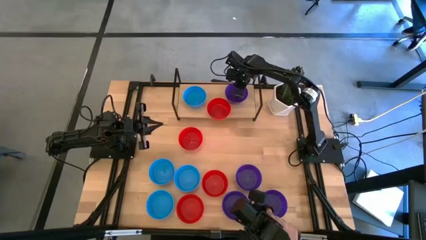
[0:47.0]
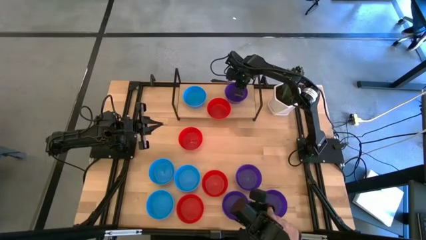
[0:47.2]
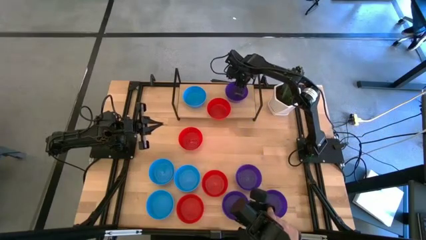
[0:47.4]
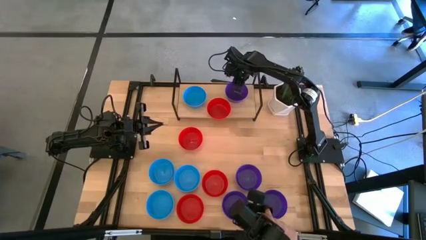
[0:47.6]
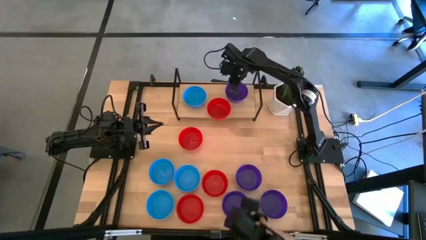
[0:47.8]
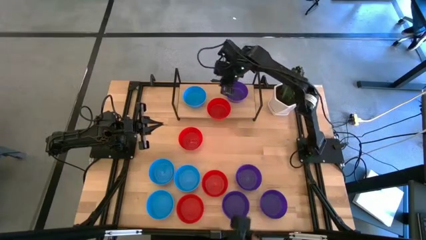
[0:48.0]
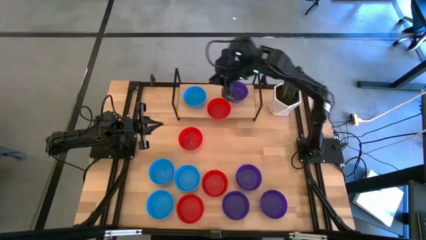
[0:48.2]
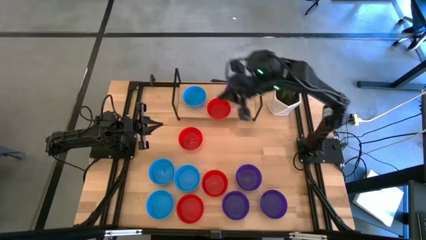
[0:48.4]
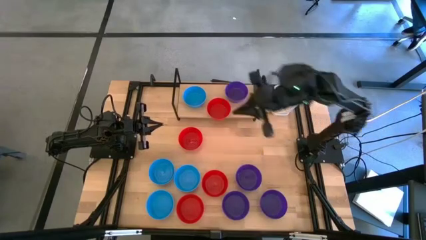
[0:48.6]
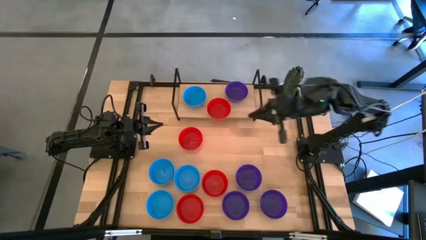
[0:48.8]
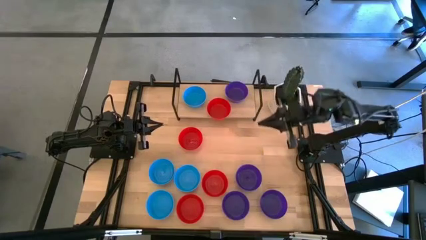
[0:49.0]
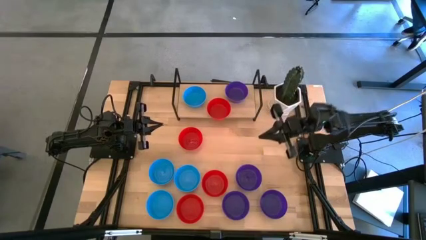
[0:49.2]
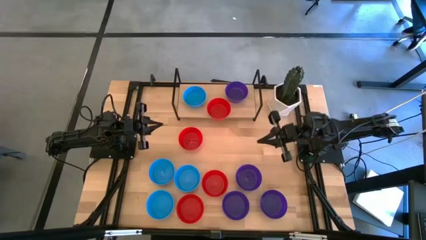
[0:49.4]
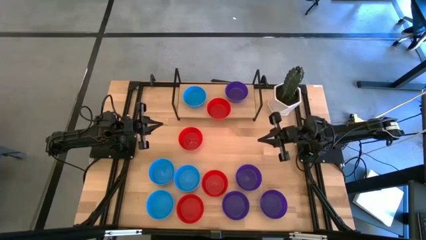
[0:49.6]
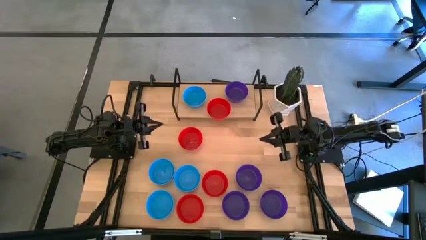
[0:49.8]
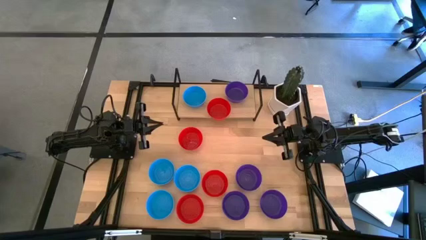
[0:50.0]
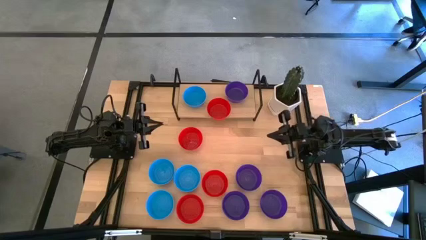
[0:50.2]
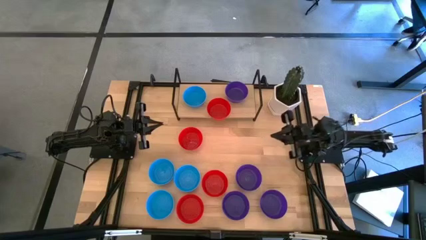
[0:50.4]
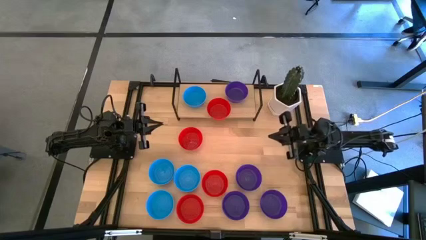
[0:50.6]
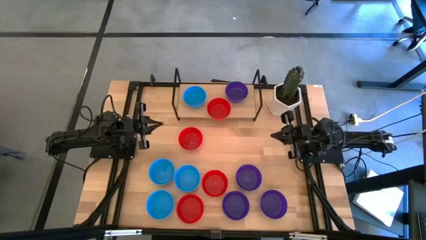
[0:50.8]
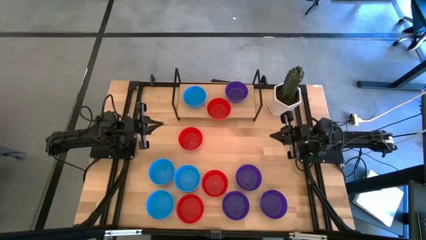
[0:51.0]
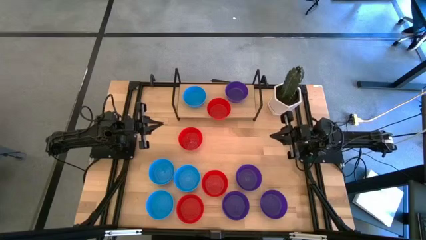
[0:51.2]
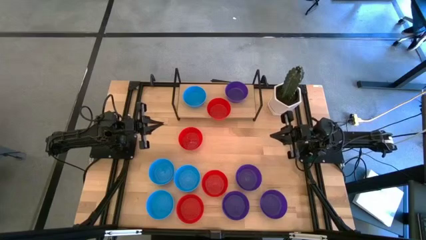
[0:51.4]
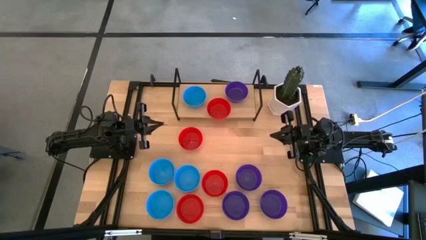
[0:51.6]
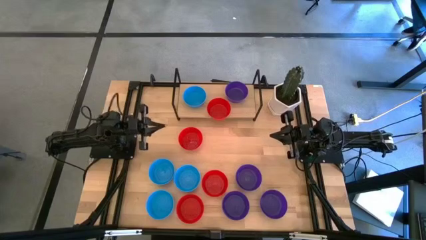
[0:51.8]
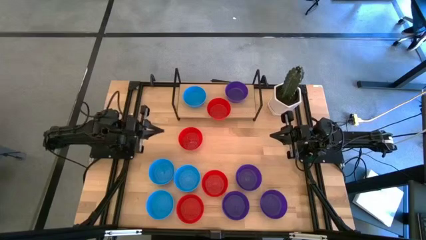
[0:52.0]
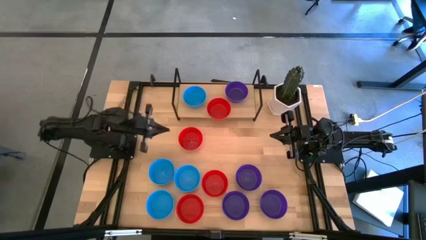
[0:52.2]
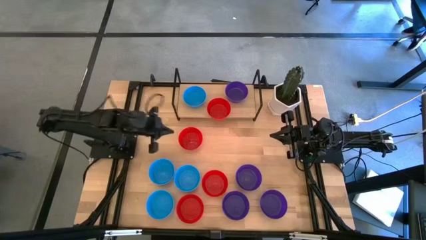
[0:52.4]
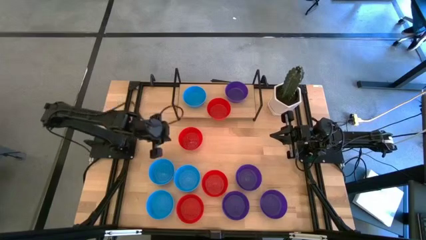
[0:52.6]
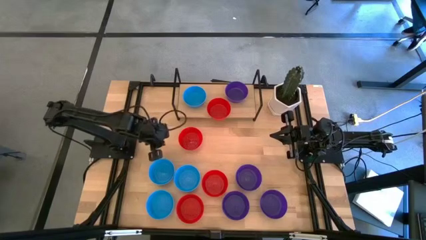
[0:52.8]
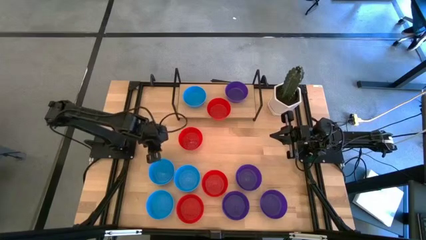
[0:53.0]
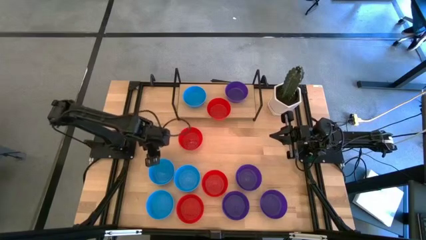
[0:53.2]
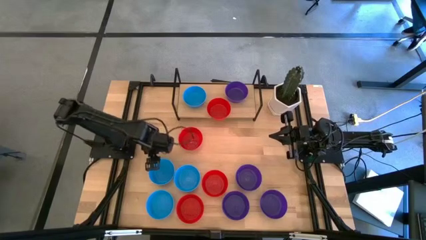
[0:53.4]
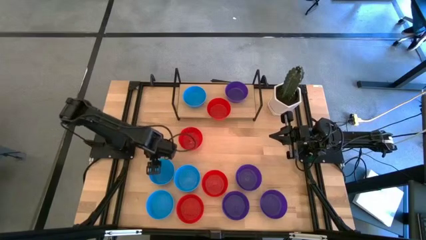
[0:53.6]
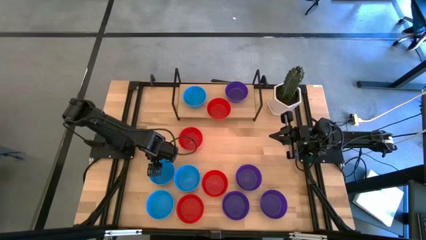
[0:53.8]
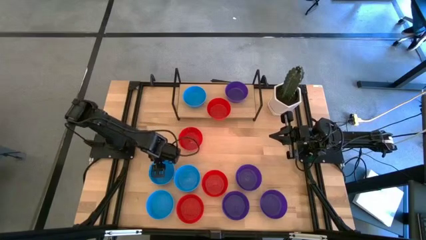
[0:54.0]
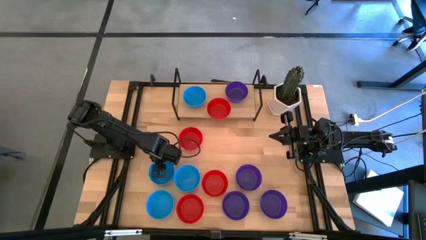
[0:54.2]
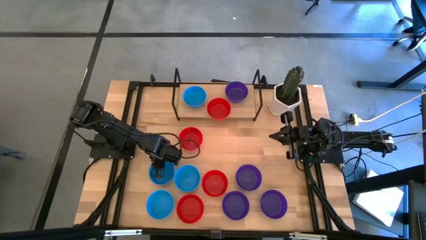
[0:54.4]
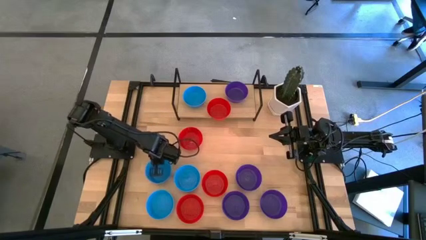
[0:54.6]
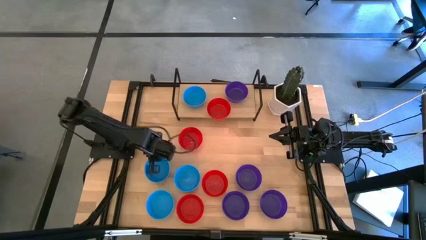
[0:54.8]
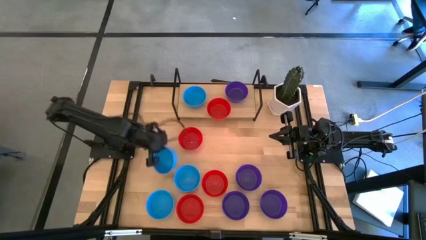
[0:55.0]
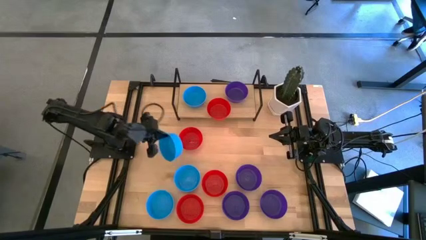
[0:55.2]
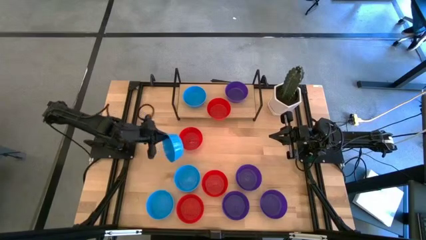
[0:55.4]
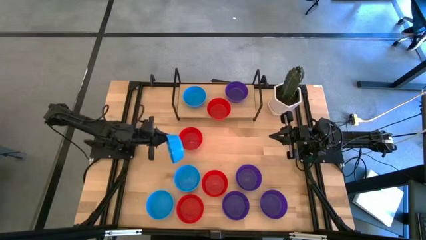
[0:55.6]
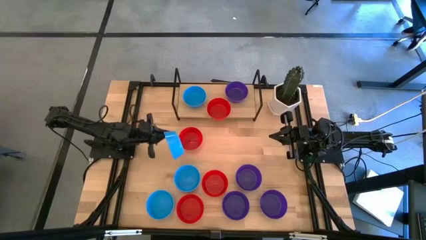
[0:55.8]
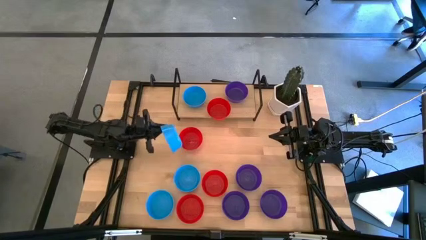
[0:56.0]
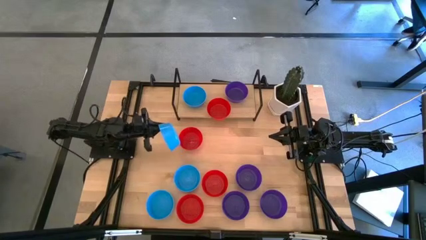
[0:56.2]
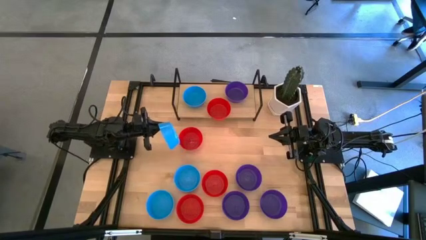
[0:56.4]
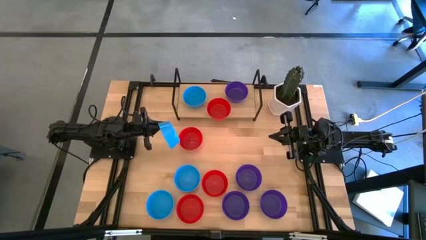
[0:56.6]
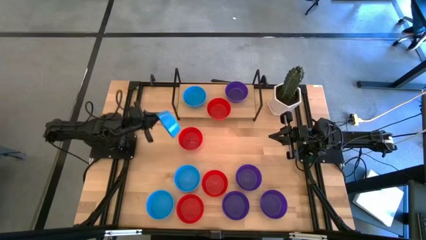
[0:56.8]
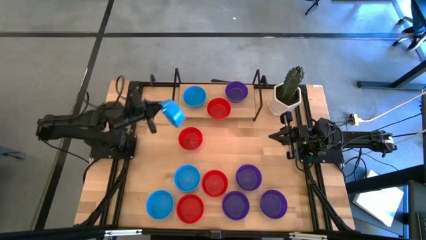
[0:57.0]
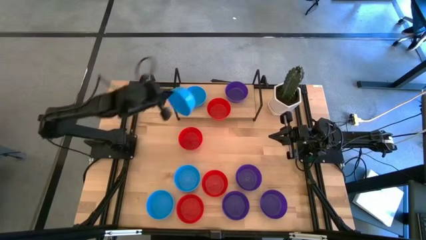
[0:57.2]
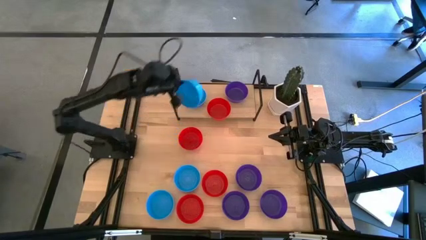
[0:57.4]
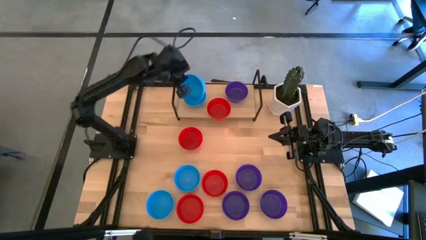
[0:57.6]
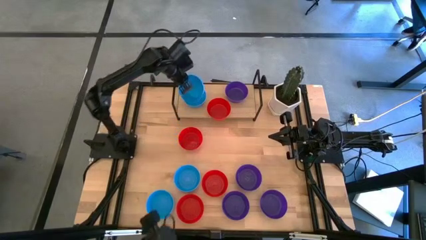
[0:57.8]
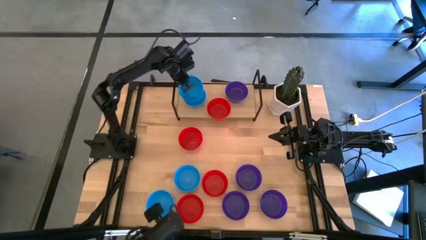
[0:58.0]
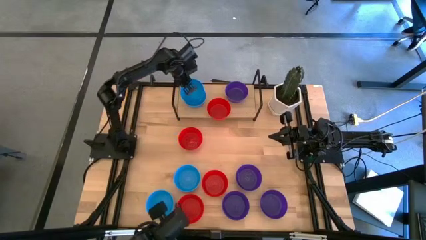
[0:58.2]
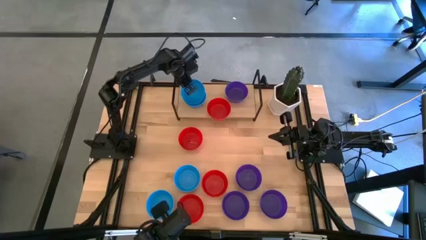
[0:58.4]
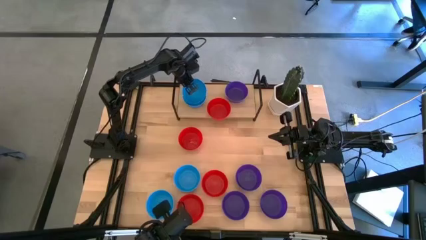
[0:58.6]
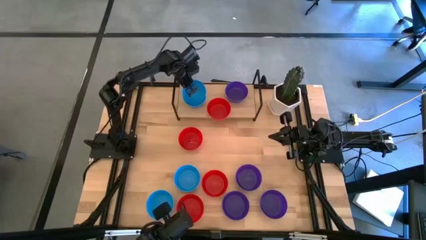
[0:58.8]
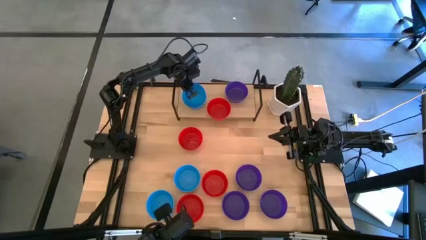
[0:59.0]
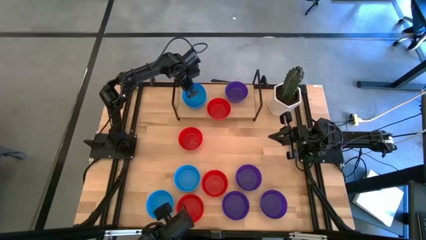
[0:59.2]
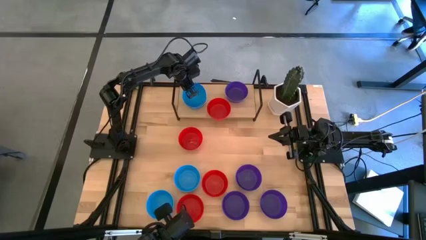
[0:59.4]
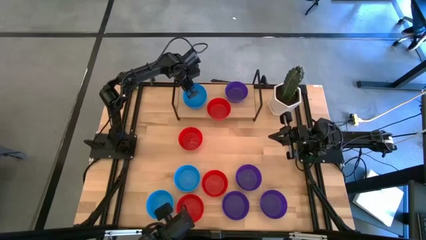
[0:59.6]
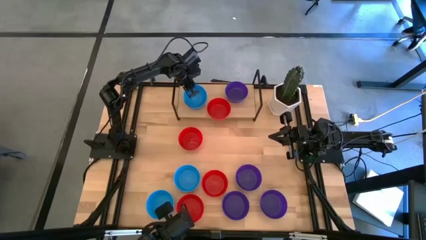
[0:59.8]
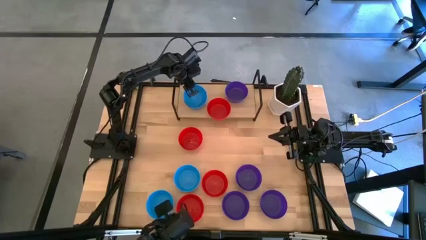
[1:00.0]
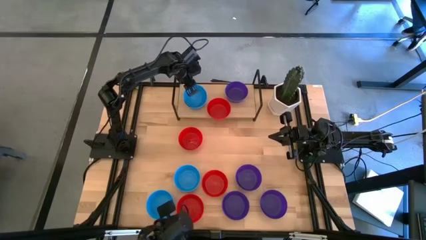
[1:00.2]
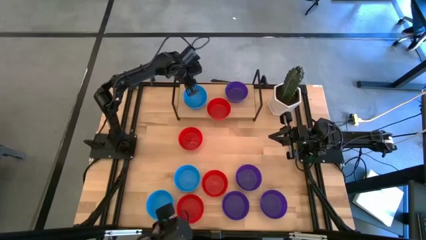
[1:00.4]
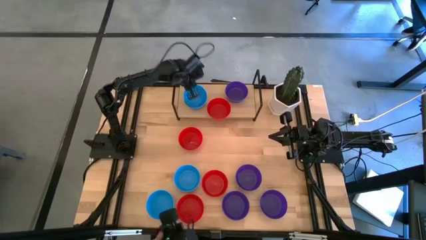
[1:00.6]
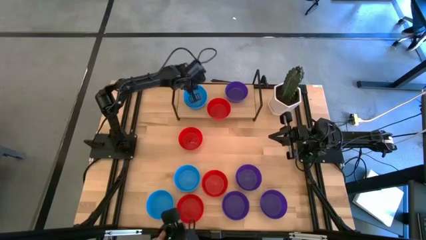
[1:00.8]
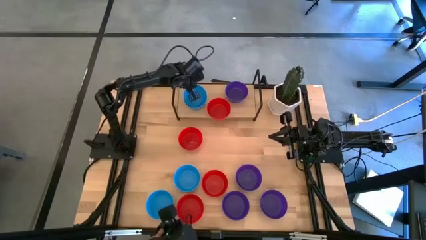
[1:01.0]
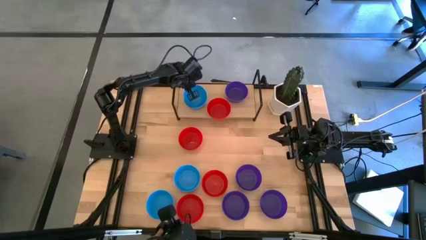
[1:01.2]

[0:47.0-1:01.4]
Task: Pick & Place Mini bowls
Stack the blue bowl on the blue bowl on the shelf
